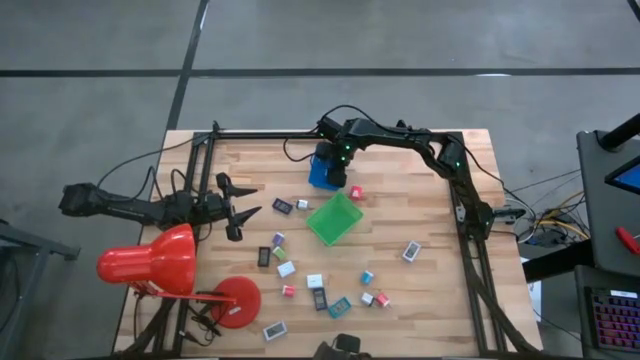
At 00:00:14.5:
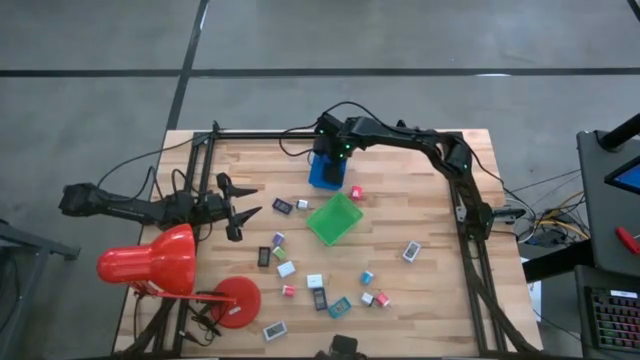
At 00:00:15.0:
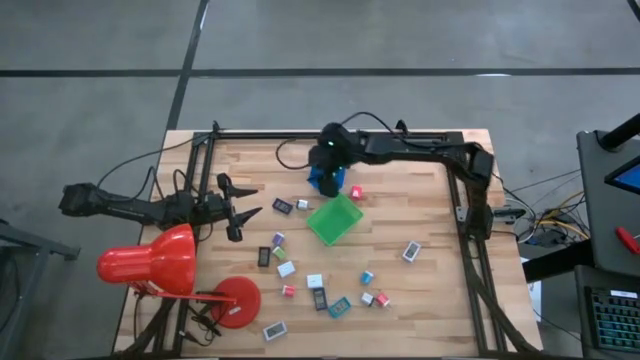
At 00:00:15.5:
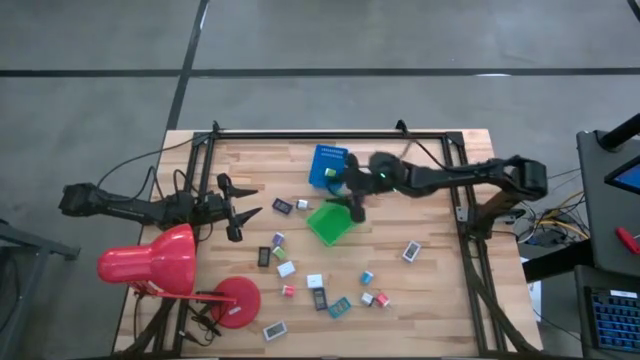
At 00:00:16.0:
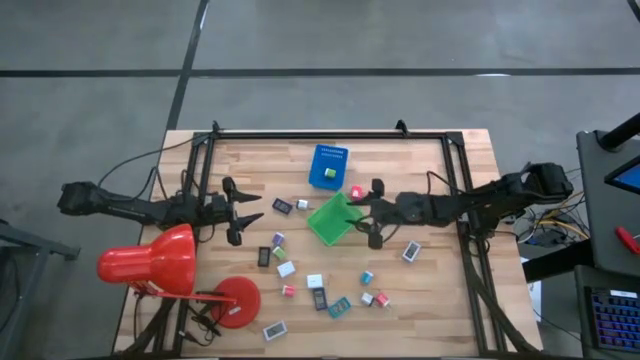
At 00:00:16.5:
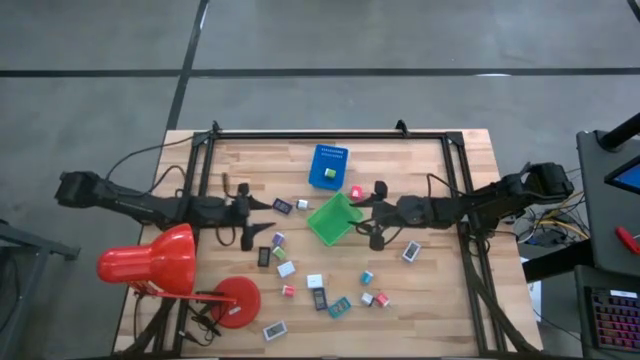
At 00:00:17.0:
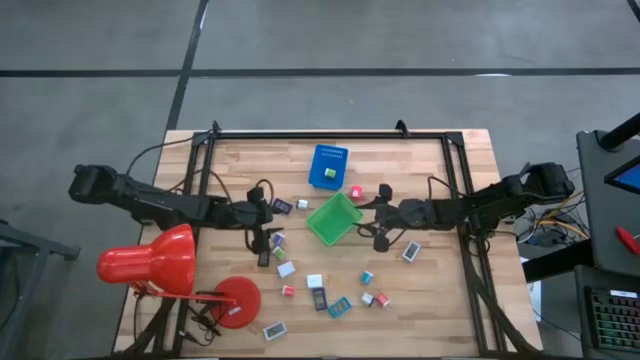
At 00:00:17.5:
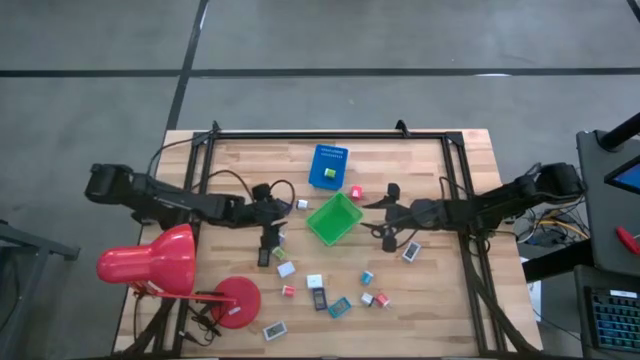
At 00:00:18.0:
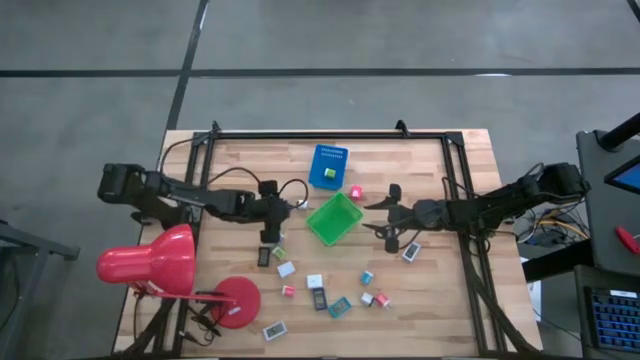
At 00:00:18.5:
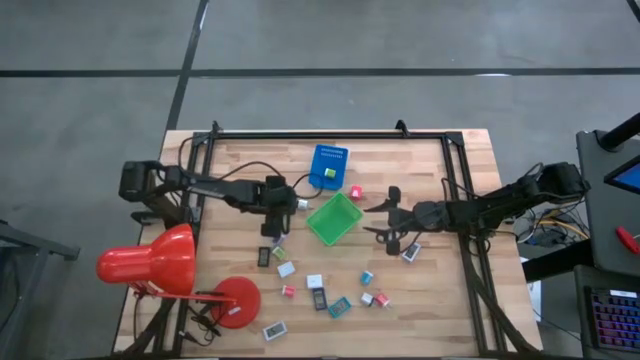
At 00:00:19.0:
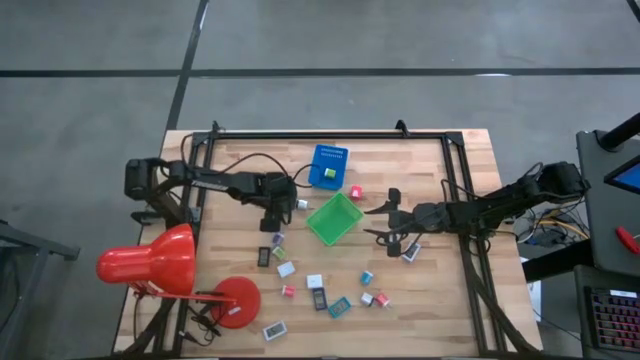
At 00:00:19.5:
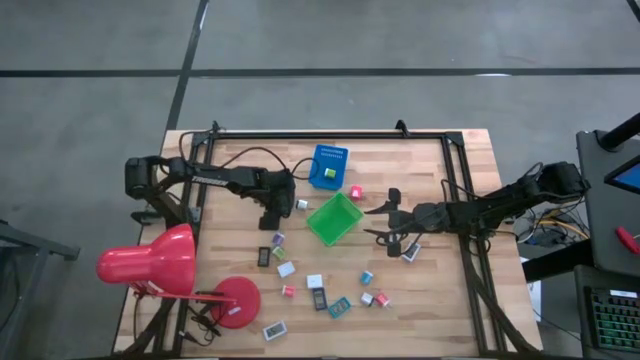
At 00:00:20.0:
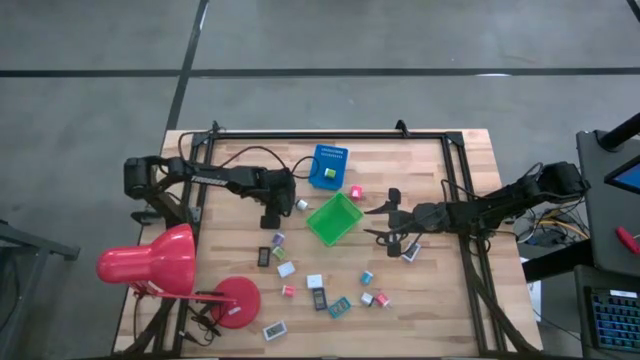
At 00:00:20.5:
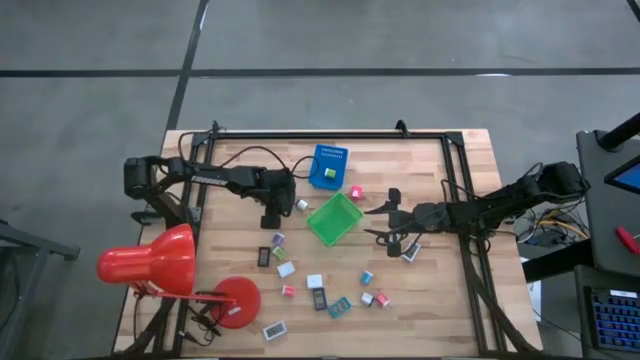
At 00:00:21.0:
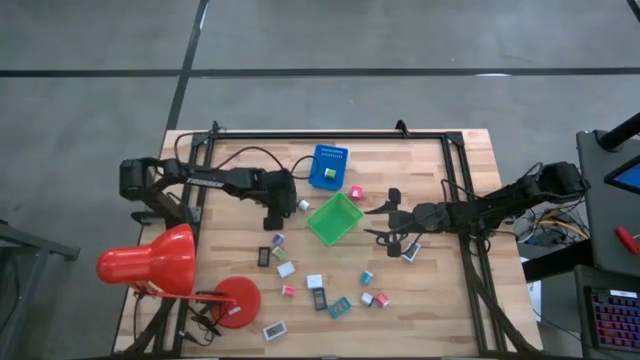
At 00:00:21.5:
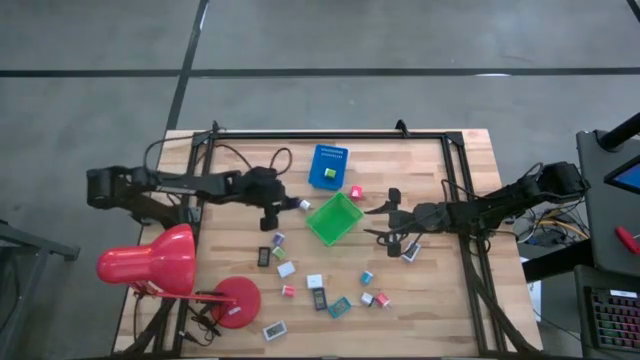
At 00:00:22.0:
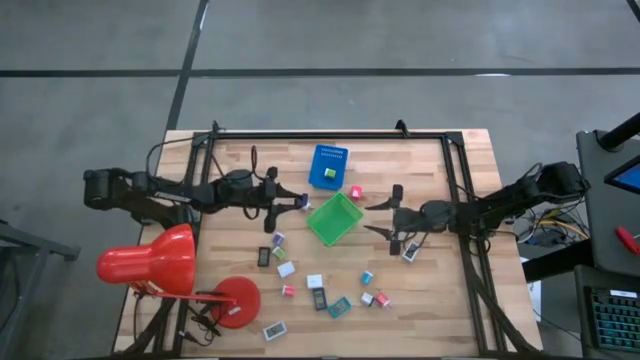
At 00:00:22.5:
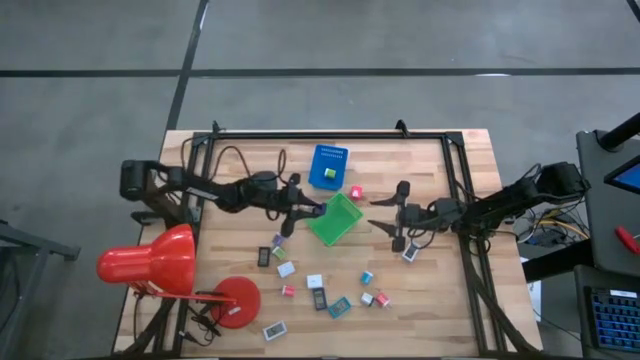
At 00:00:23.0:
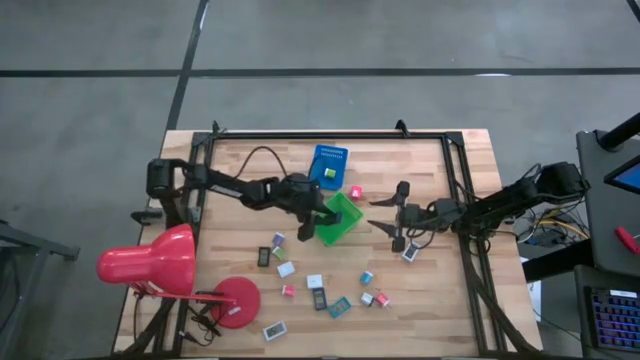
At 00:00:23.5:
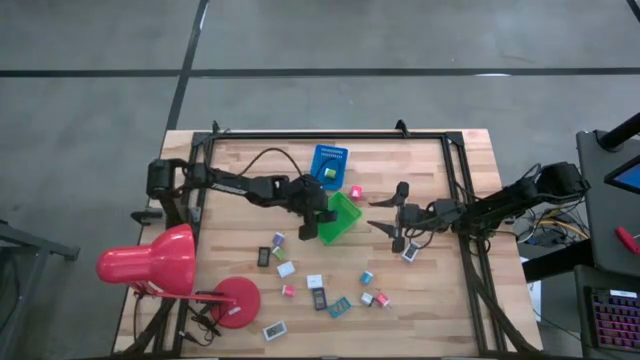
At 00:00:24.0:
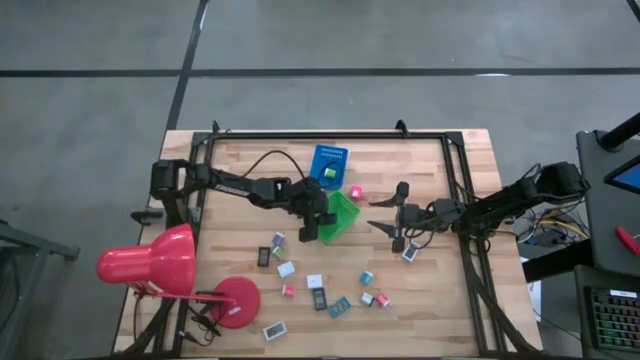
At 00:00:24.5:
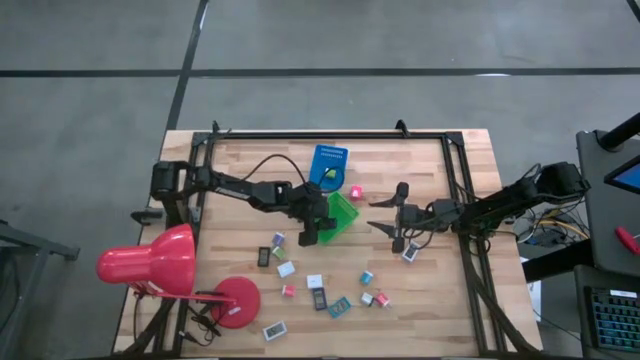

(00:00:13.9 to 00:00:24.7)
Task: Pick & Place Office items
Put the top blue digital clock into the green bin

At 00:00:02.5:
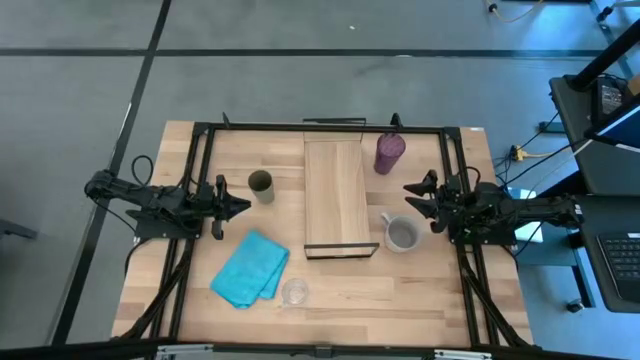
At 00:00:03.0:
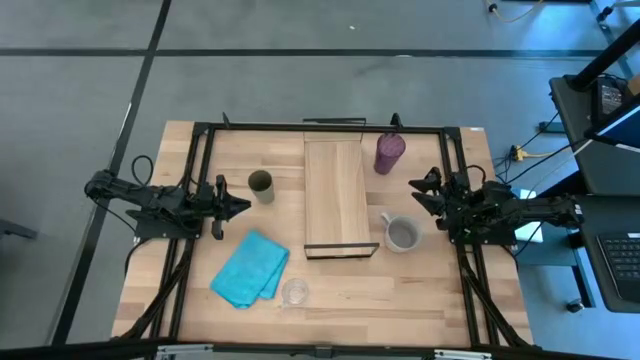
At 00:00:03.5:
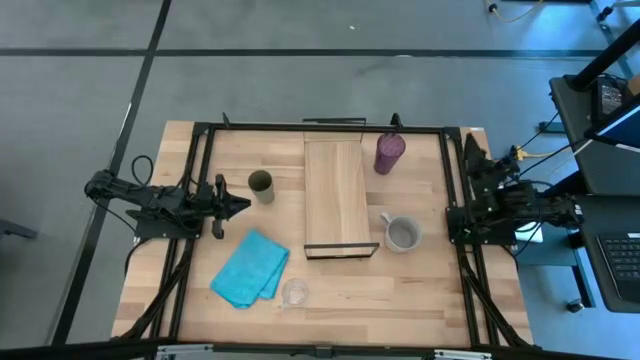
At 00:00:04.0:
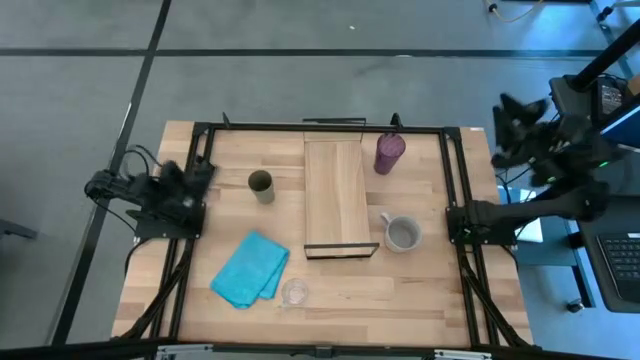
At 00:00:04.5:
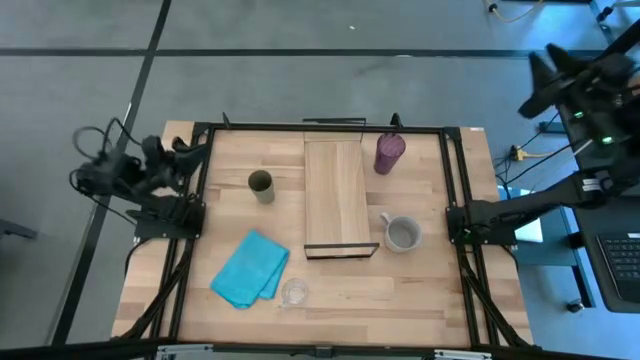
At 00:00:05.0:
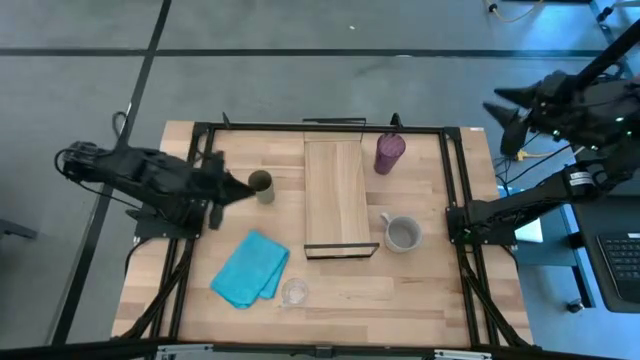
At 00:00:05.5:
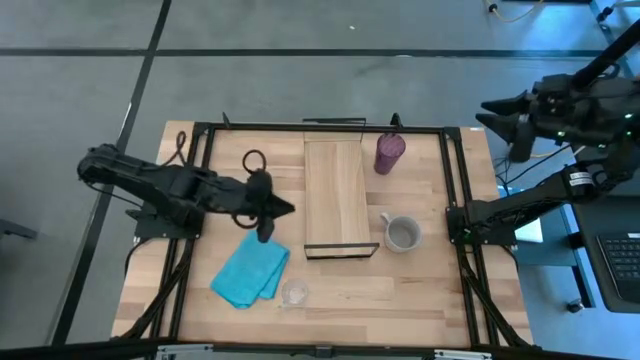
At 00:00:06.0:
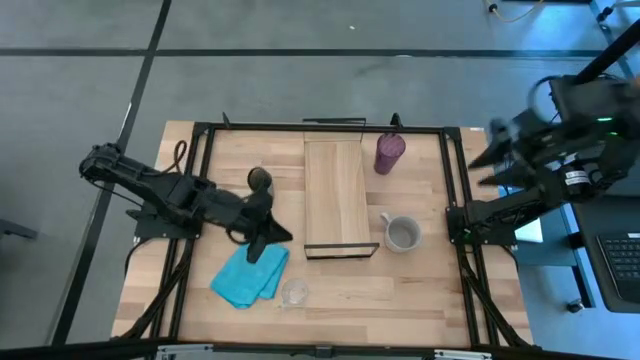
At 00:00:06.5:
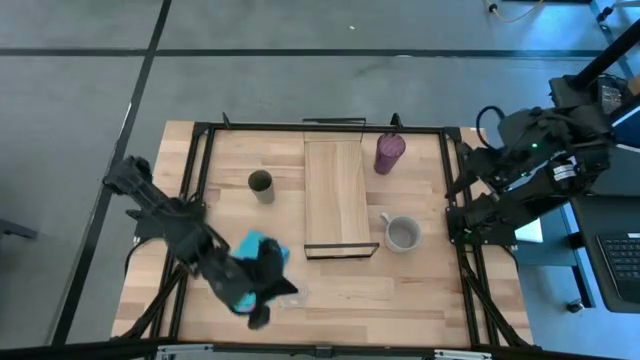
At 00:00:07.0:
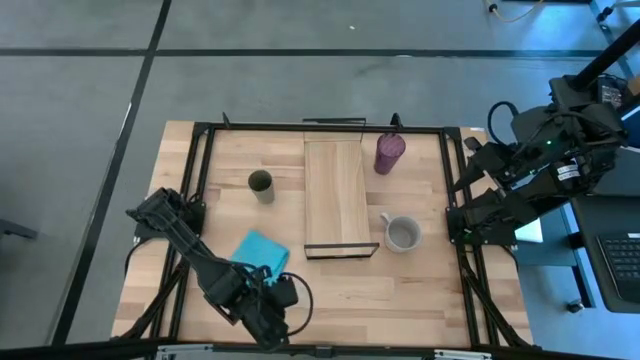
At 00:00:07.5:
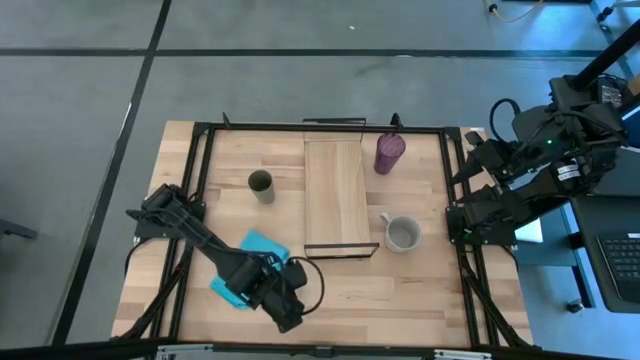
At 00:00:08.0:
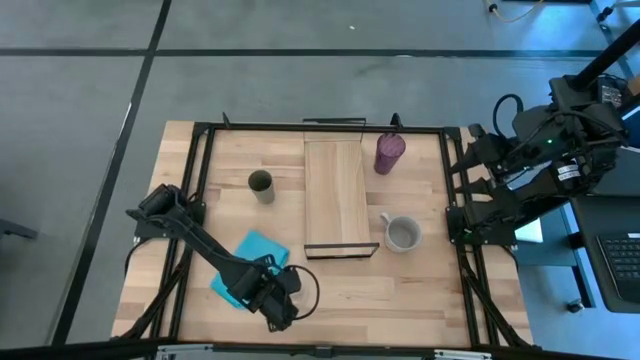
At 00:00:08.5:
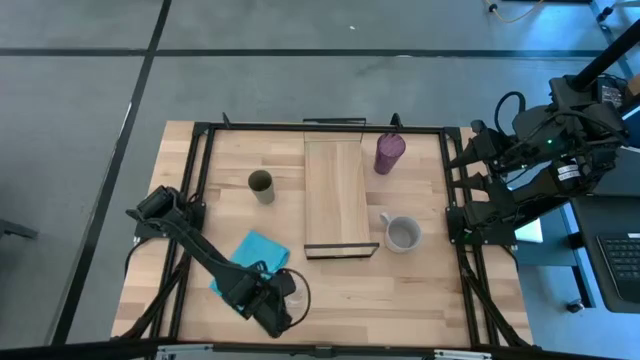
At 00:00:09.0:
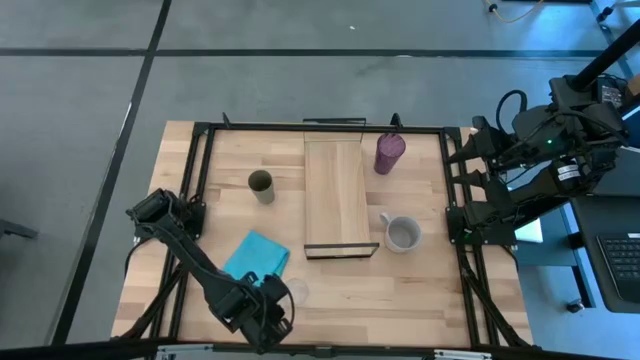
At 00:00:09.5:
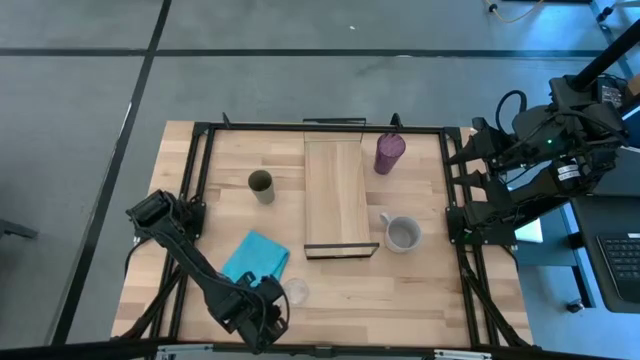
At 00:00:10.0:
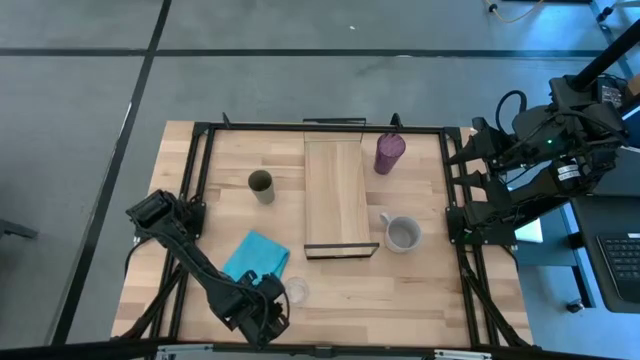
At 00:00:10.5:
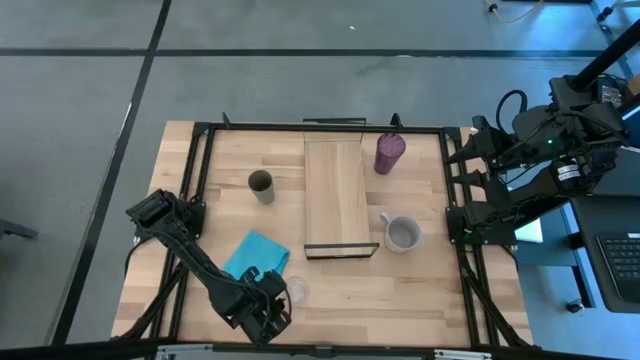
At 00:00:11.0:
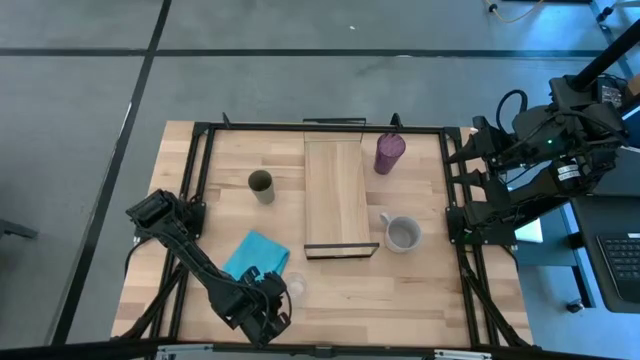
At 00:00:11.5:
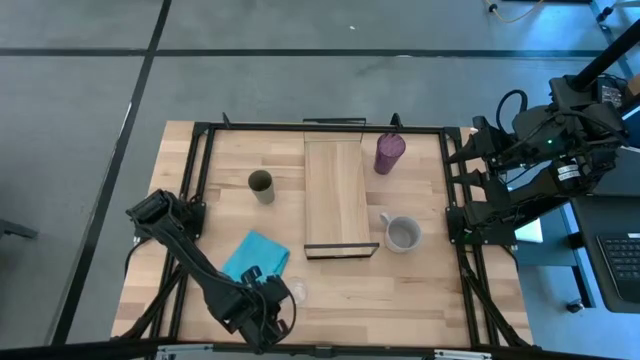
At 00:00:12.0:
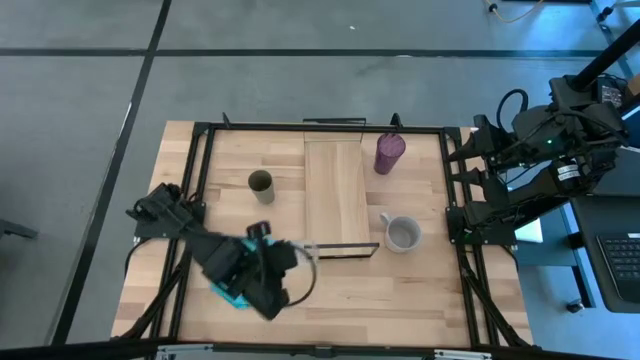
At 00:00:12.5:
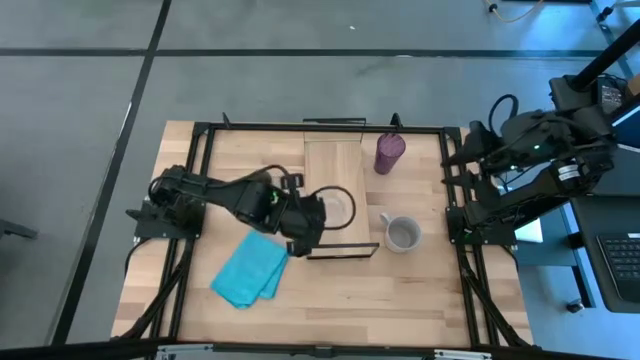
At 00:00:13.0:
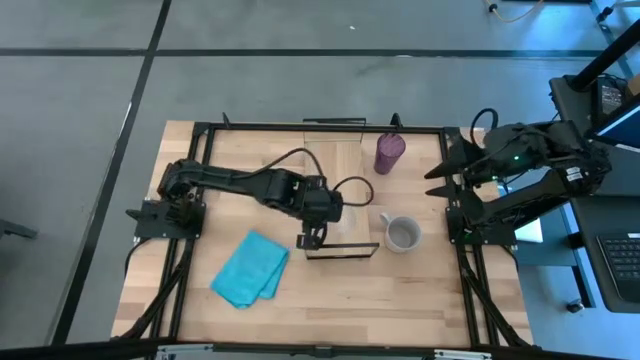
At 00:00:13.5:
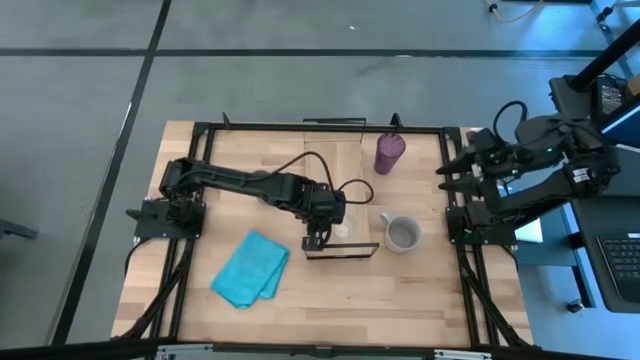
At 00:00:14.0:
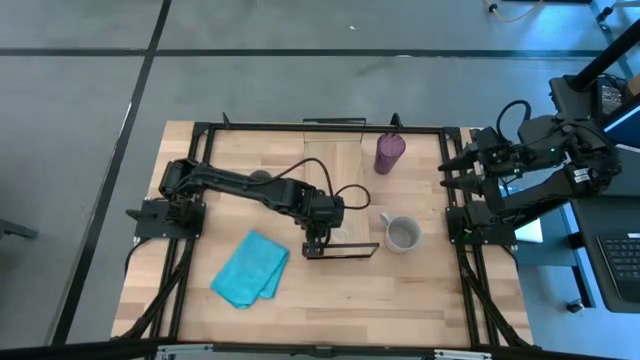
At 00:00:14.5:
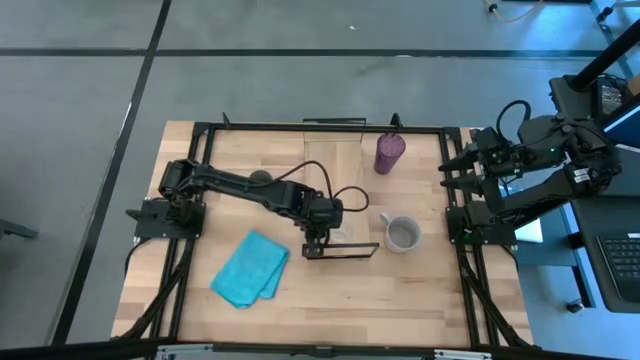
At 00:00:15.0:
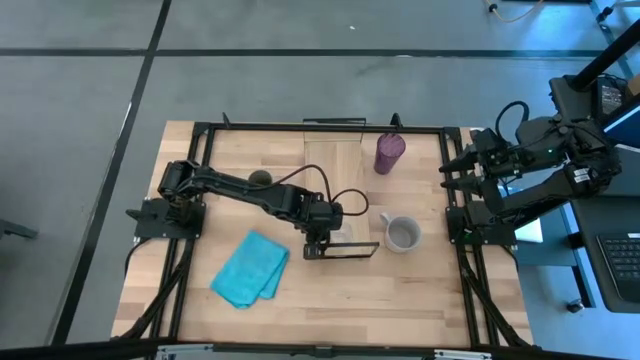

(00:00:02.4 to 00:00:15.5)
Task: Stack small to large cups/mugs on shelf
Put the transparent mug on the shelf
